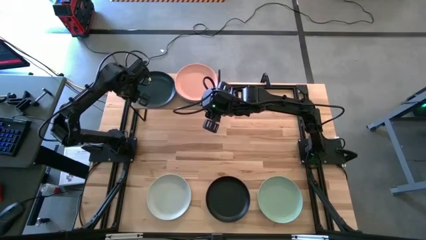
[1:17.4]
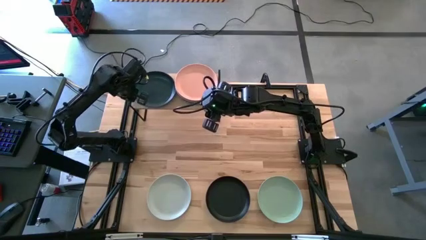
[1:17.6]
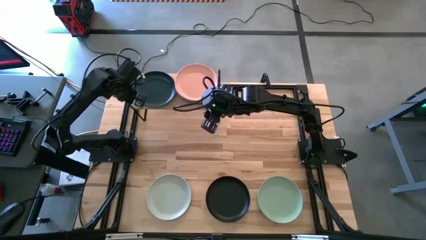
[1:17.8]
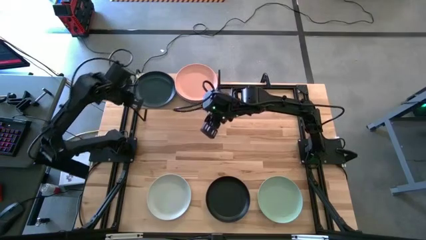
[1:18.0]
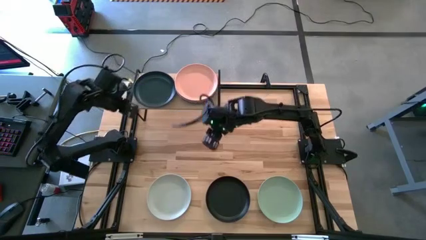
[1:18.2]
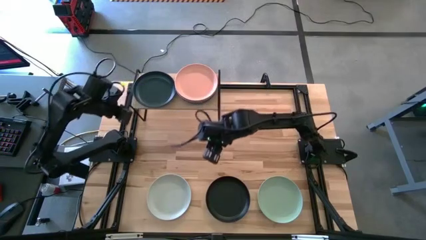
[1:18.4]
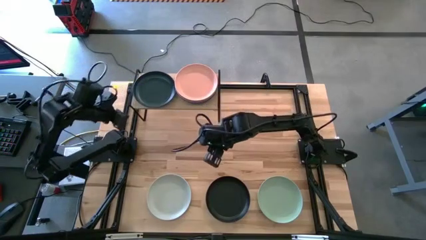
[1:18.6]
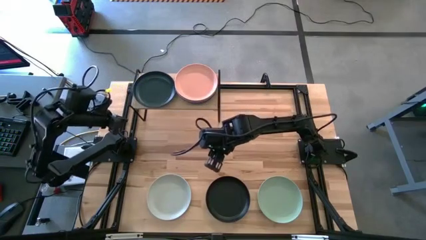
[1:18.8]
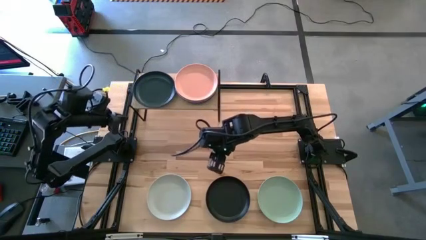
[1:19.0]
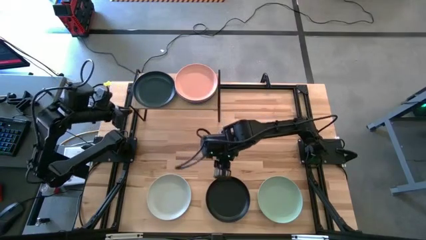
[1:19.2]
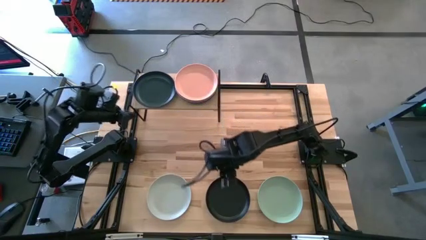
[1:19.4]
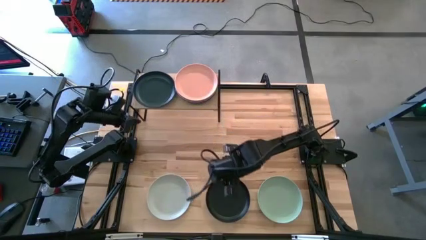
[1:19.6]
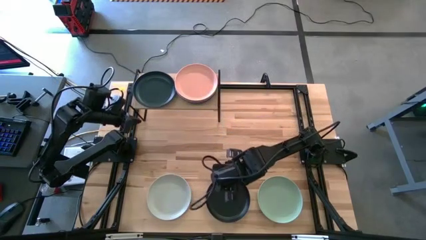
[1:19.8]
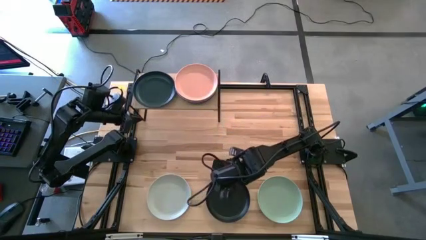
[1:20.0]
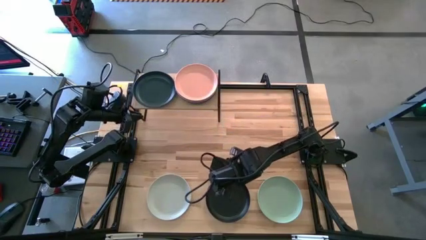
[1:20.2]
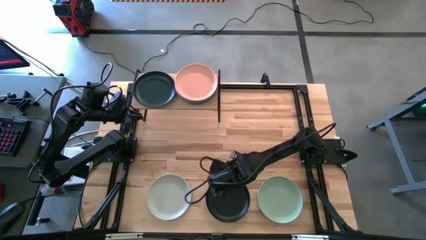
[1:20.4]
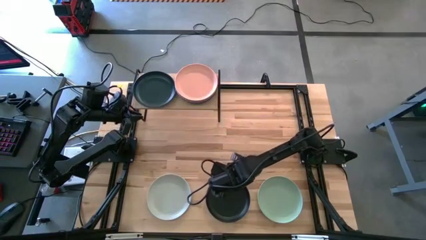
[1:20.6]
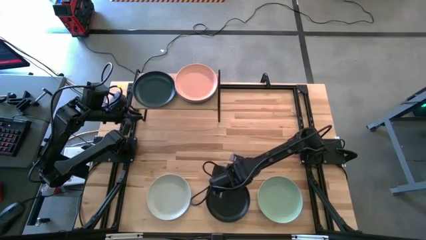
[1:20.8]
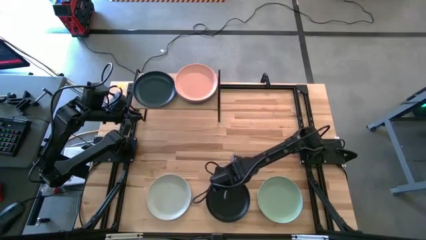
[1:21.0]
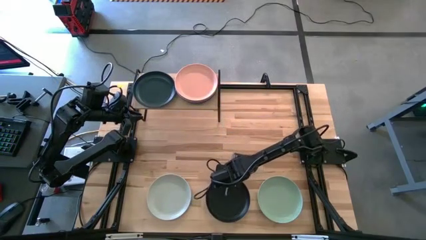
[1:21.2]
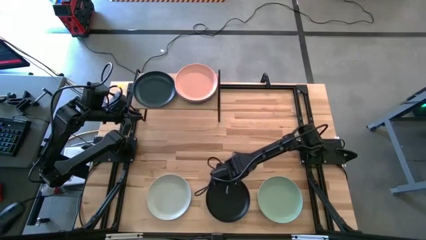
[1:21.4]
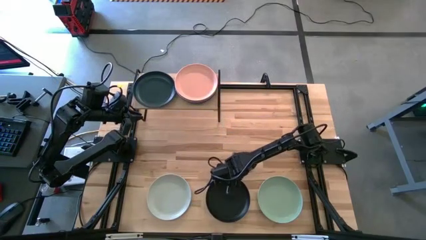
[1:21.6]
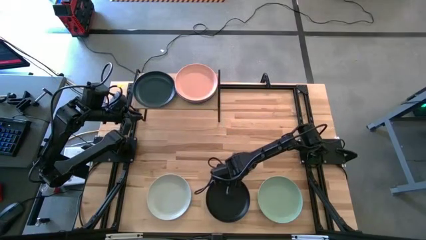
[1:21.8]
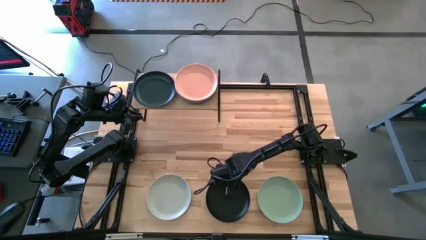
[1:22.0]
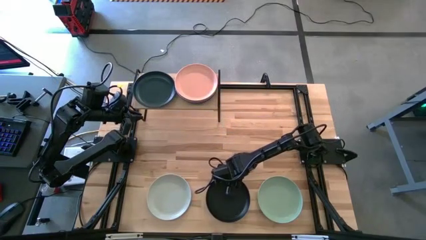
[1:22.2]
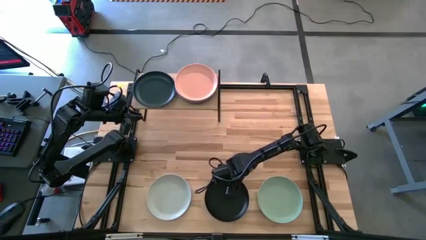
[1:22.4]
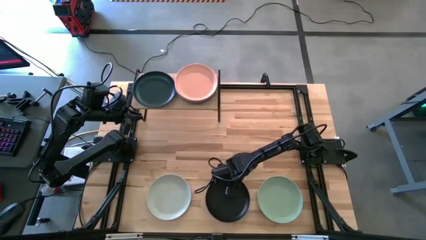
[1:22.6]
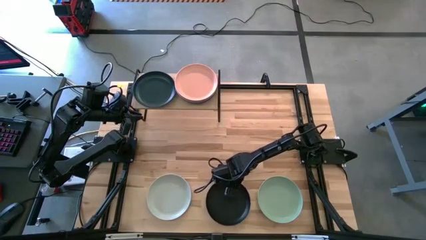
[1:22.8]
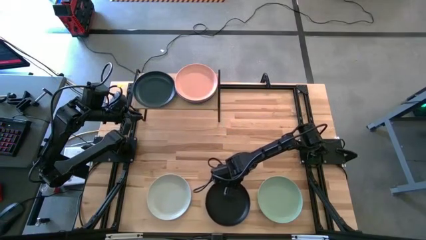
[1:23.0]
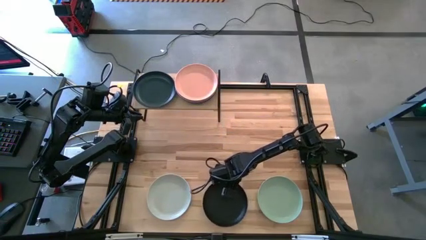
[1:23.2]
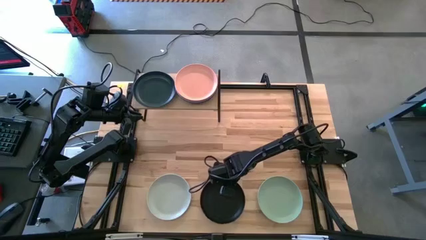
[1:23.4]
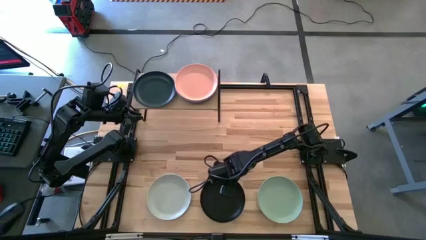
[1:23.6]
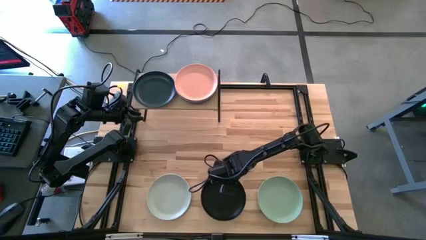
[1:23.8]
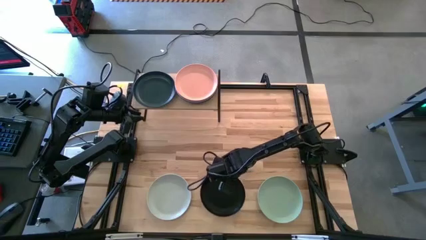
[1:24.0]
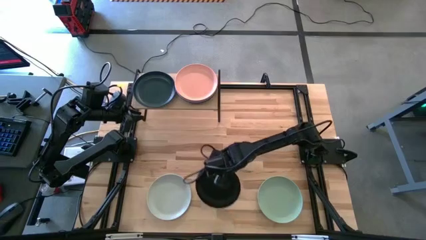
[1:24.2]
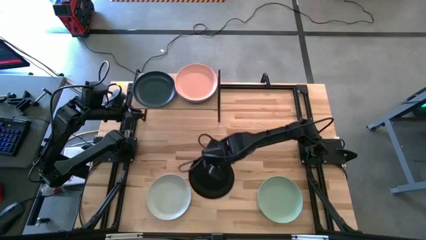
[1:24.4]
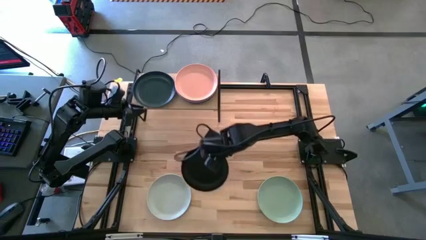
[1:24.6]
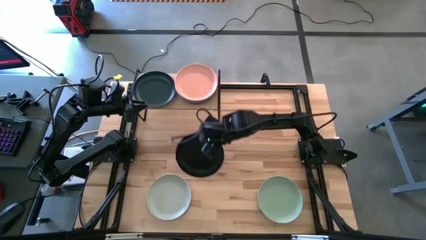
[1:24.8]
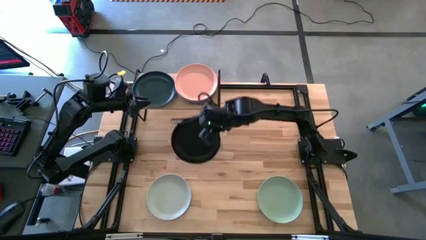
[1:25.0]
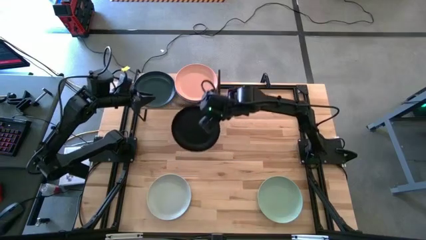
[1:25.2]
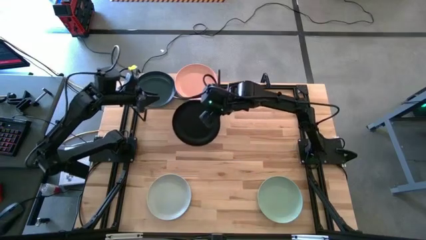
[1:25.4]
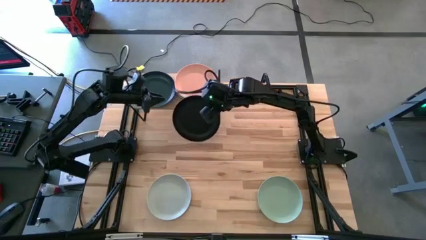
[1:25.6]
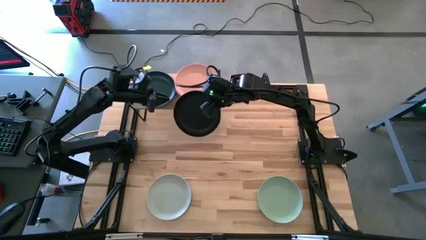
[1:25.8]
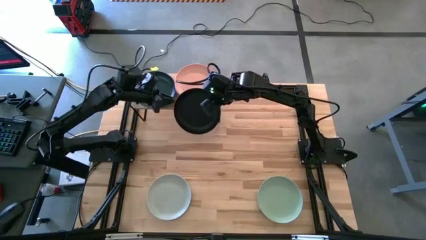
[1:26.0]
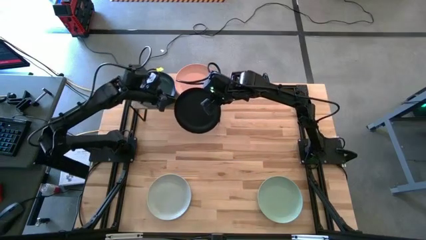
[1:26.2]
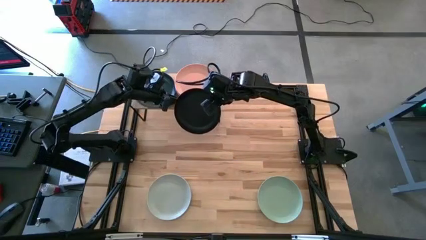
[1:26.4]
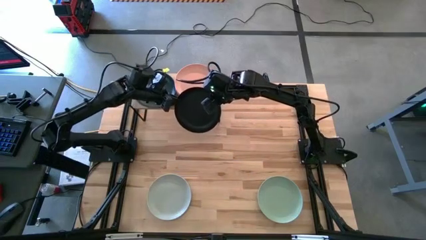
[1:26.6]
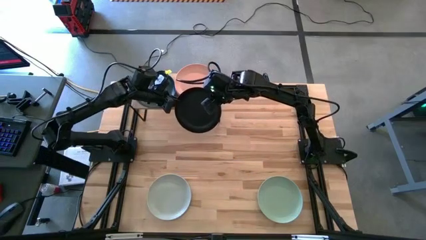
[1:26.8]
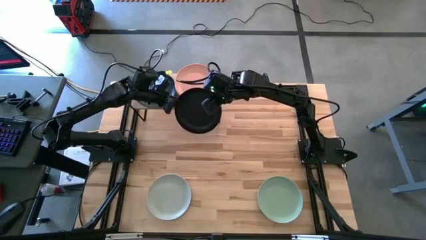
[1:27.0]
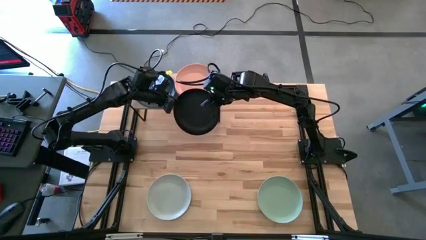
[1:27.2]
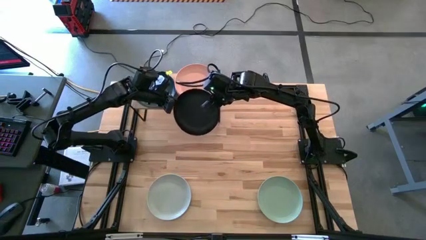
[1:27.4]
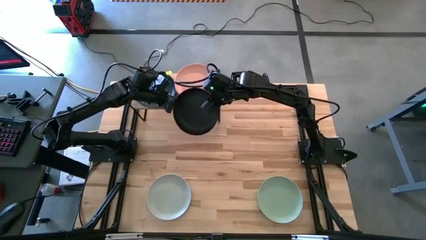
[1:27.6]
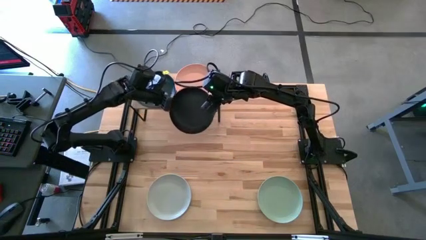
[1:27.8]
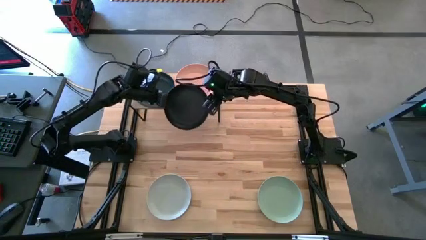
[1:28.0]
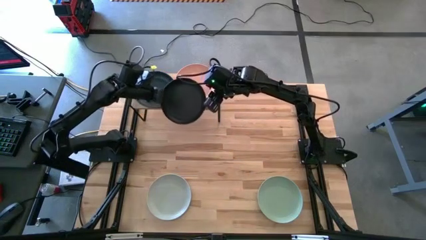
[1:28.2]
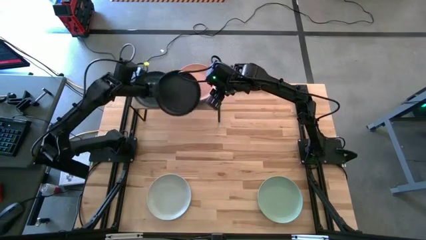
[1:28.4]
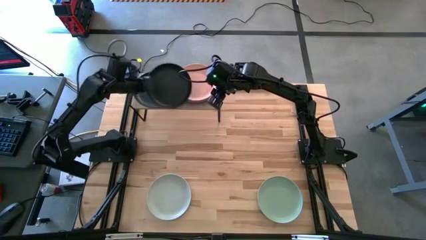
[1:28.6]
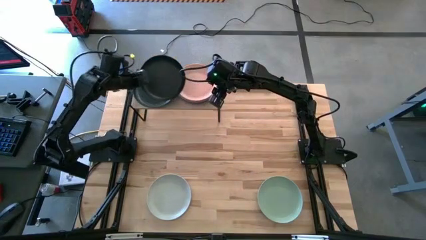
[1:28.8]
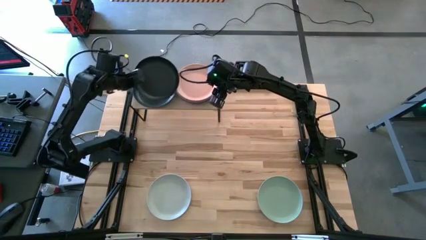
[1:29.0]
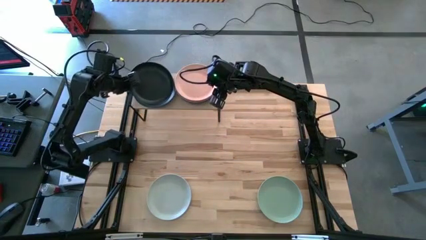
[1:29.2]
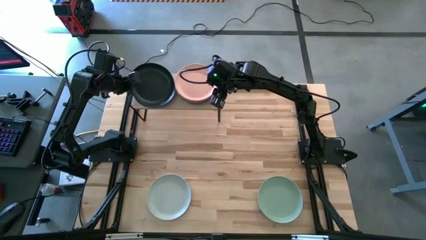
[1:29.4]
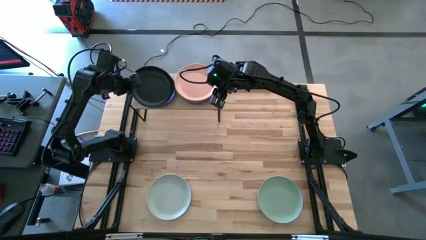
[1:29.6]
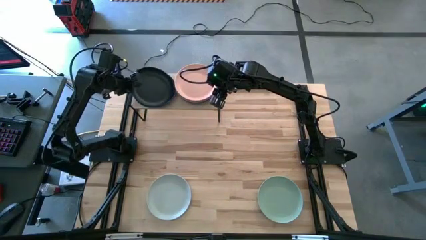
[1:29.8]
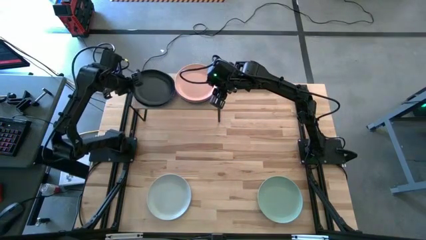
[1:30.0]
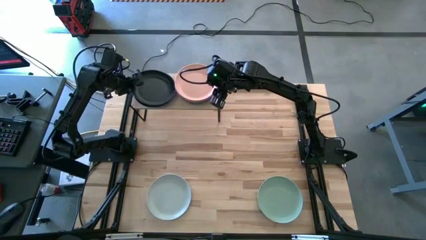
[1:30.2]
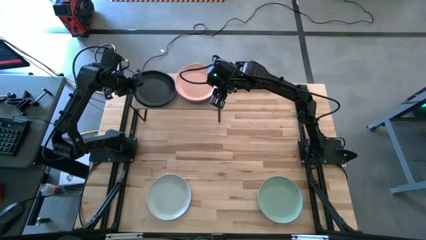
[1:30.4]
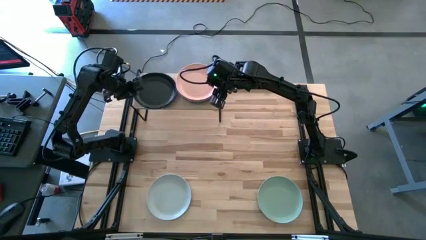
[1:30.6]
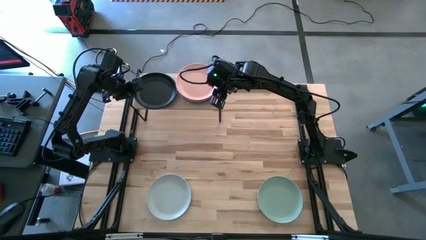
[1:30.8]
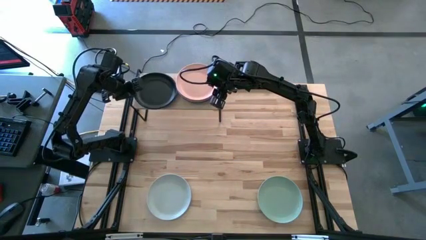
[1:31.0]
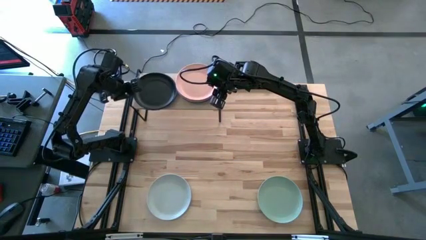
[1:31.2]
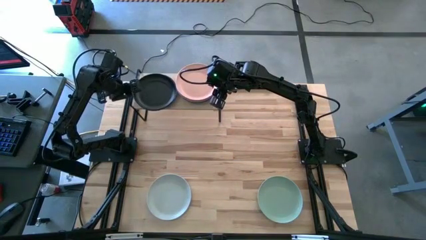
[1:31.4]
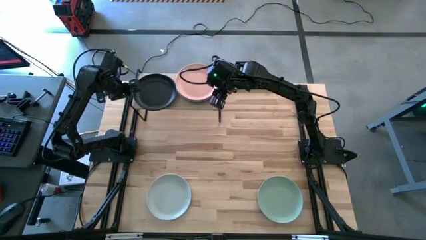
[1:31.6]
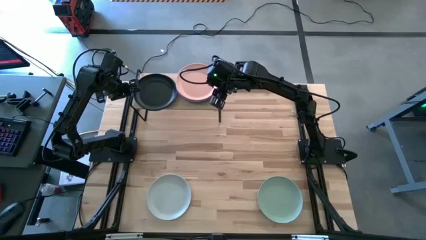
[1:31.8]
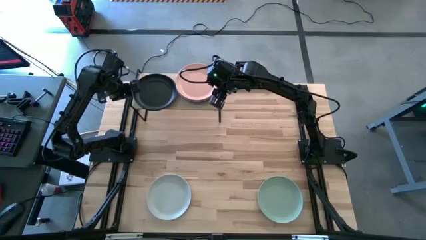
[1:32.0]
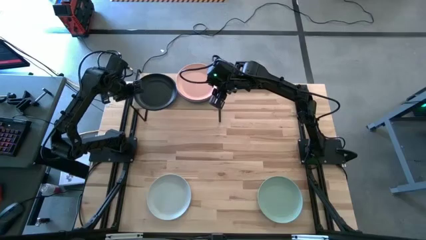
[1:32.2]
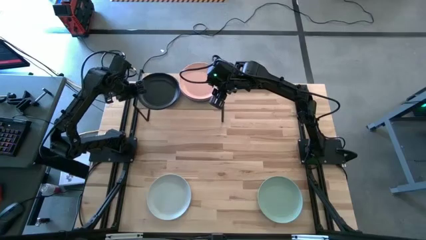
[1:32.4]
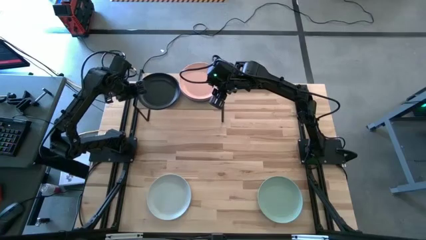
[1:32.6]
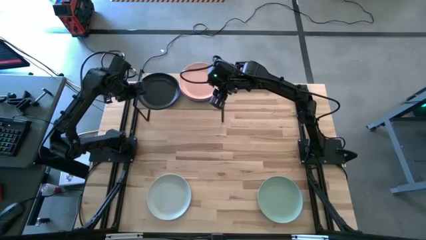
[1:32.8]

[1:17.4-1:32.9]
Task: Place and stack plates onto a shelf
Stack the black plate on top of the dark blue plate on the shelf

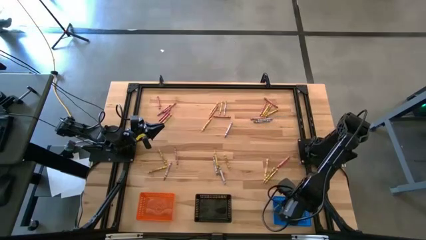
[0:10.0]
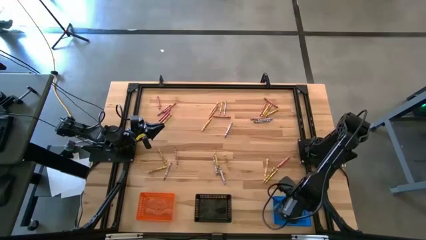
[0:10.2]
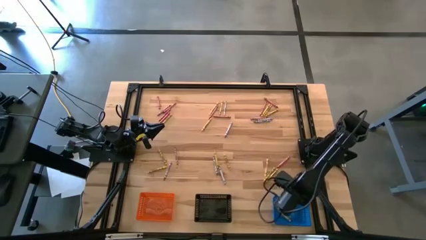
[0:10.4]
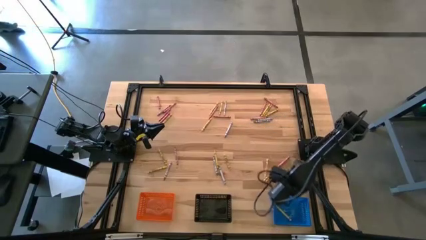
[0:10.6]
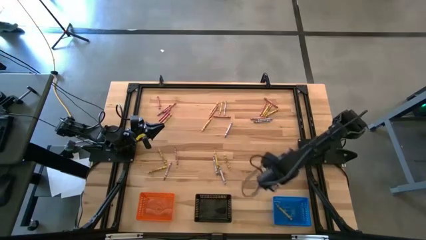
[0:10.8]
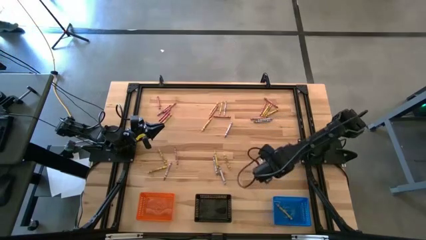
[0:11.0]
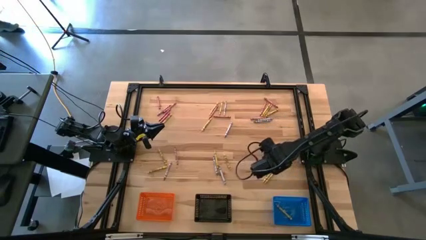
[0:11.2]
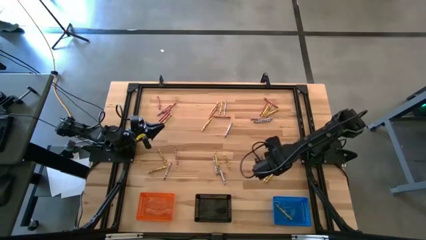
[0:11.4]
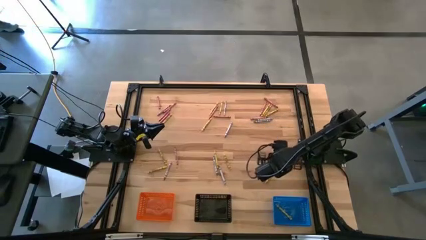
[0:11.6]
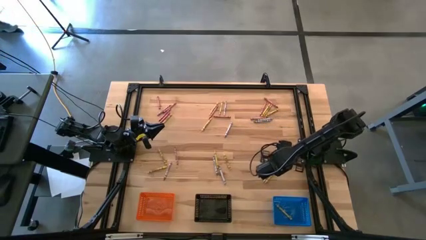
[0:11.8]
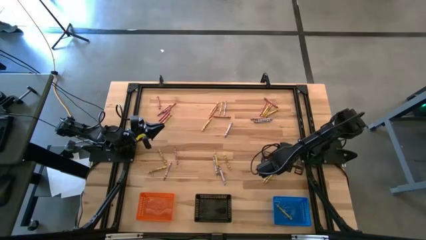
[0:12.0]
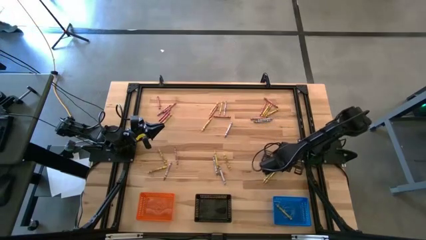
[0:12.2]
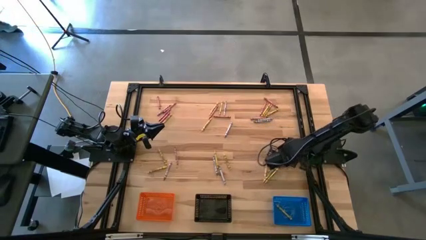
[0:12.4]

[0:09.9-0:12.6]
Task: Sort crayons
Put the red crayon into the black bin
